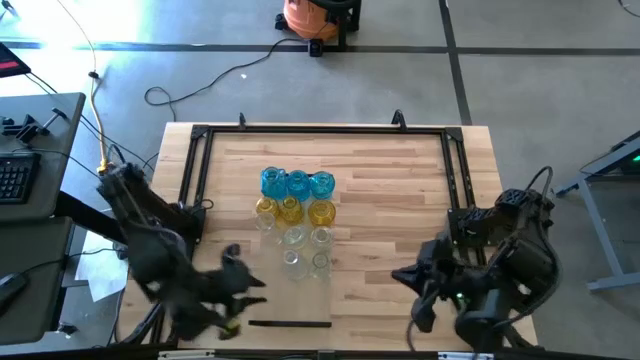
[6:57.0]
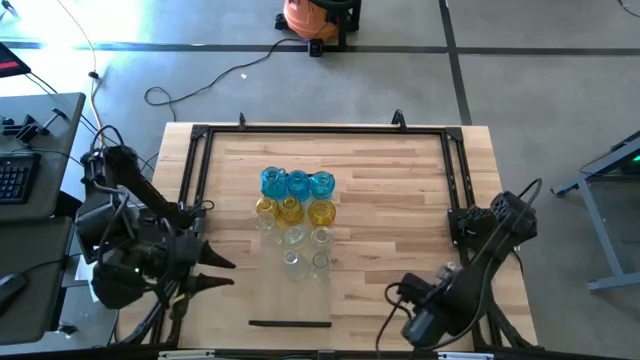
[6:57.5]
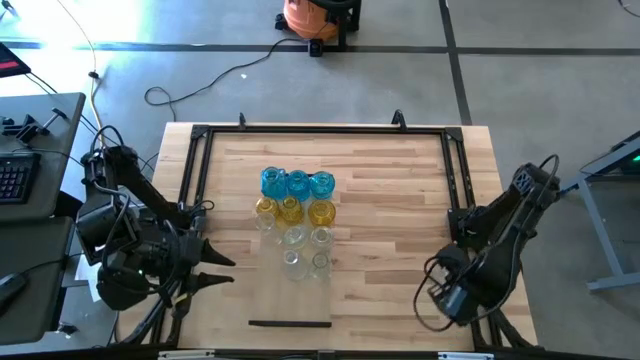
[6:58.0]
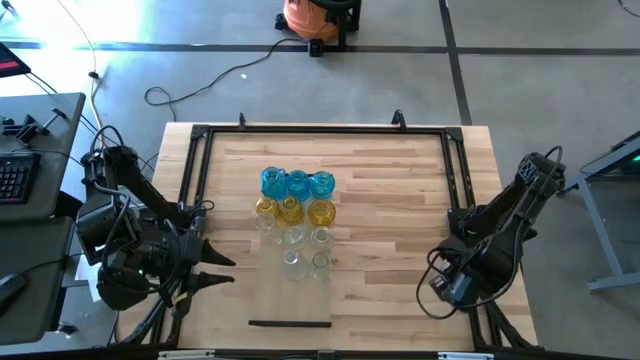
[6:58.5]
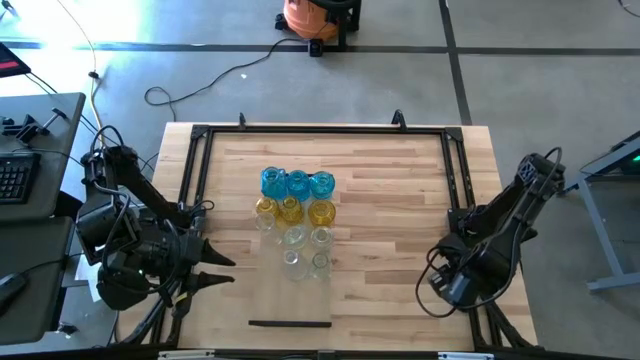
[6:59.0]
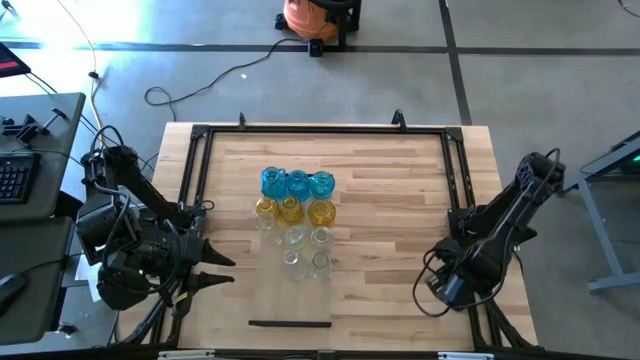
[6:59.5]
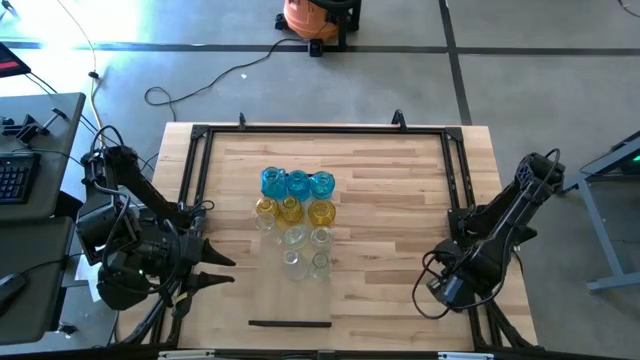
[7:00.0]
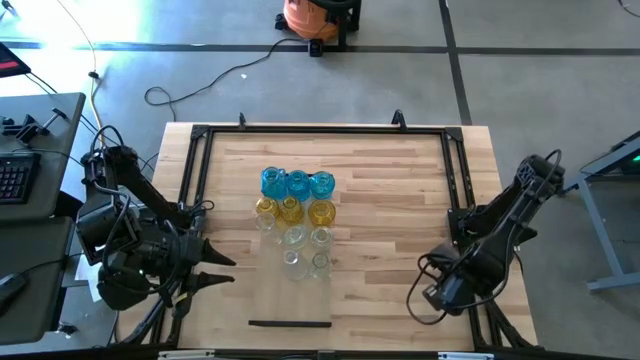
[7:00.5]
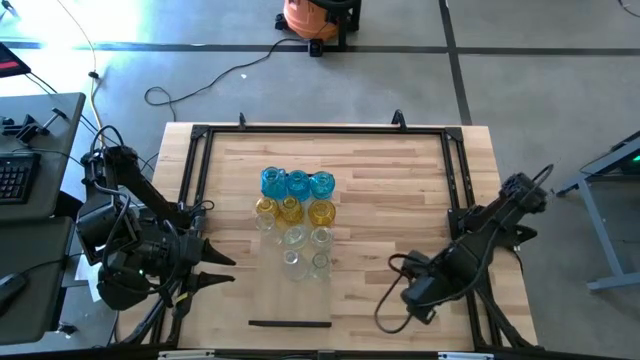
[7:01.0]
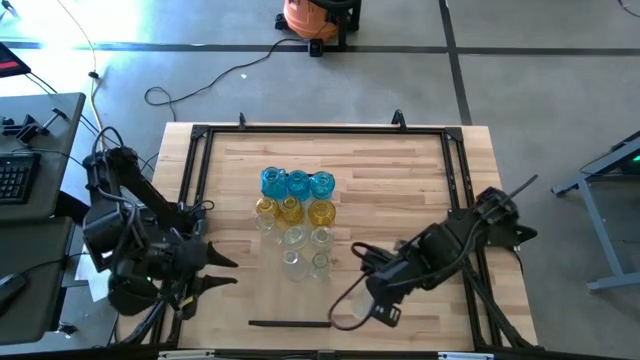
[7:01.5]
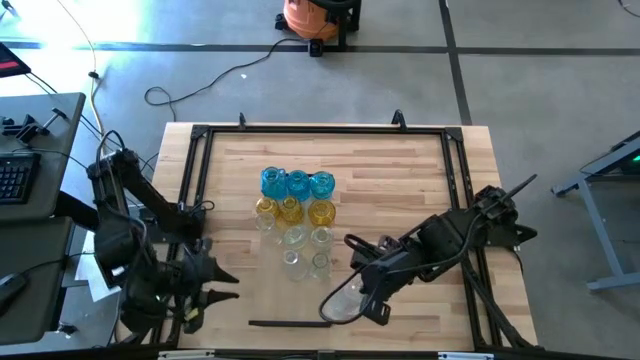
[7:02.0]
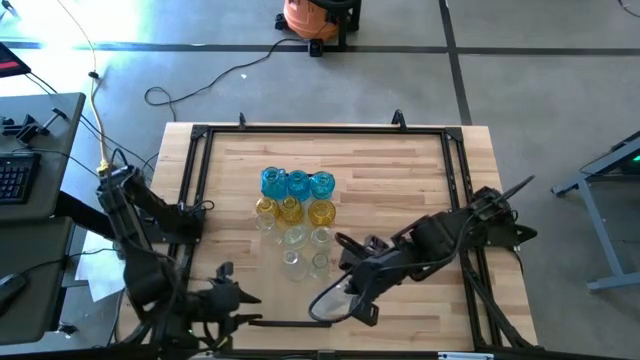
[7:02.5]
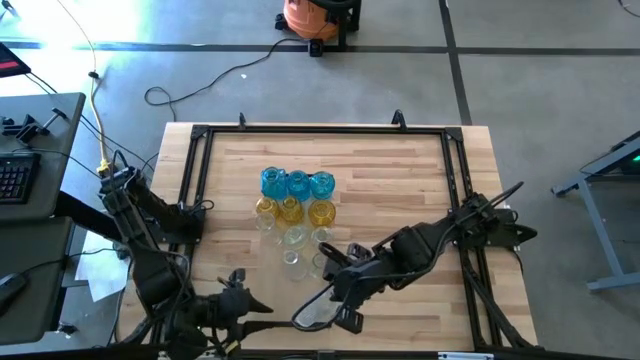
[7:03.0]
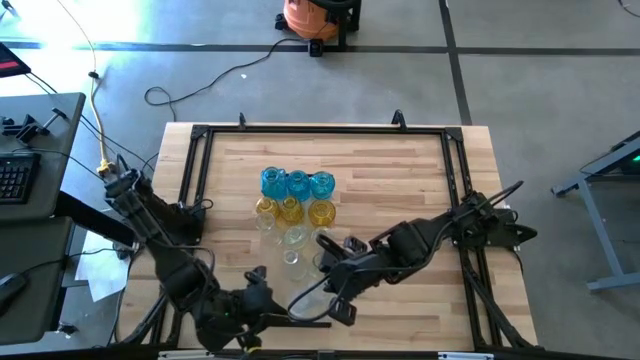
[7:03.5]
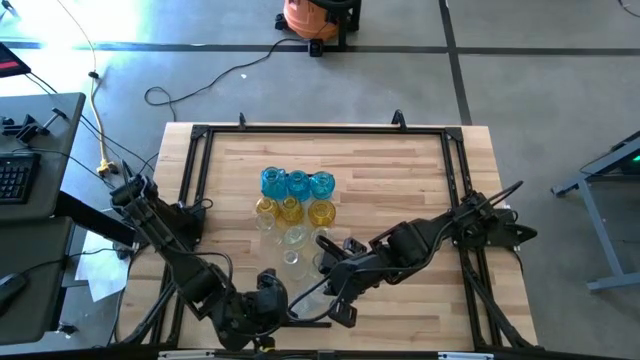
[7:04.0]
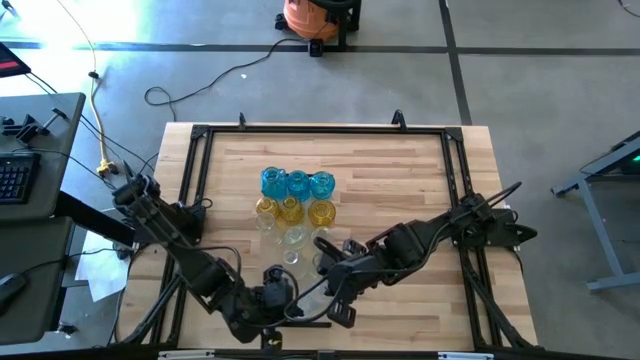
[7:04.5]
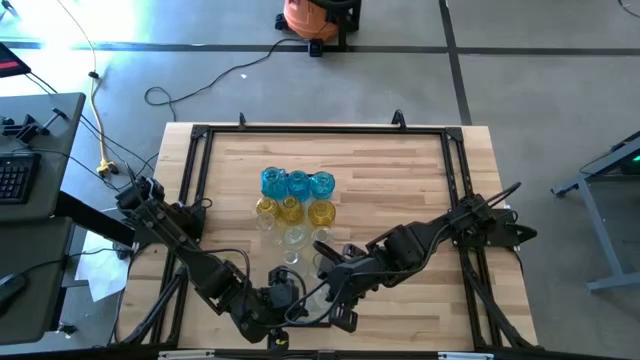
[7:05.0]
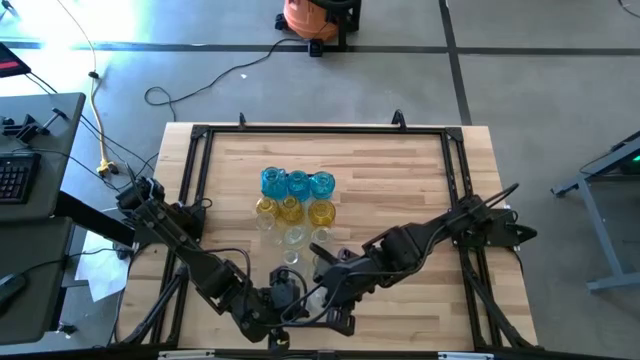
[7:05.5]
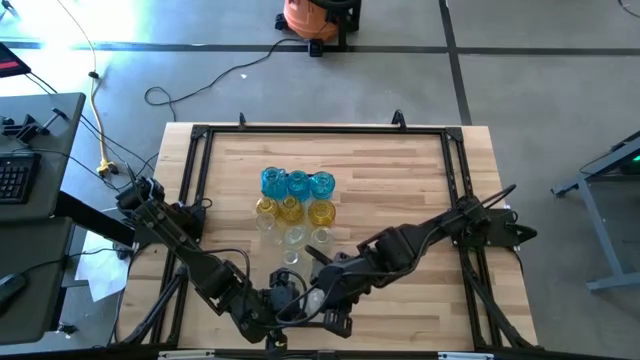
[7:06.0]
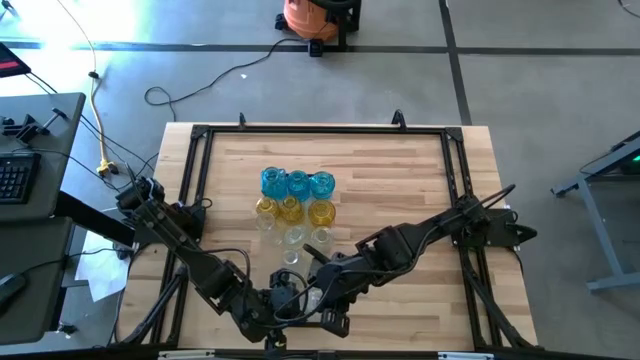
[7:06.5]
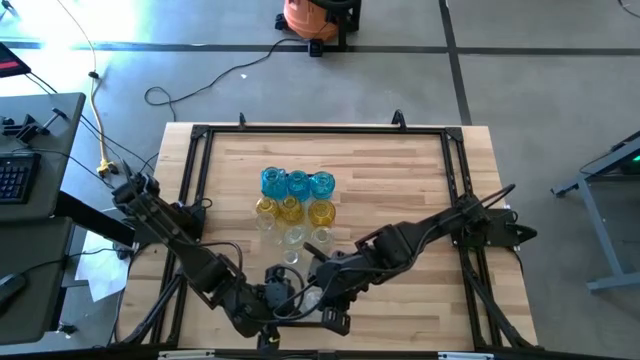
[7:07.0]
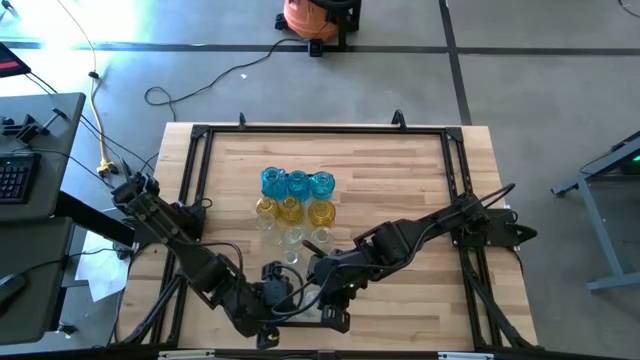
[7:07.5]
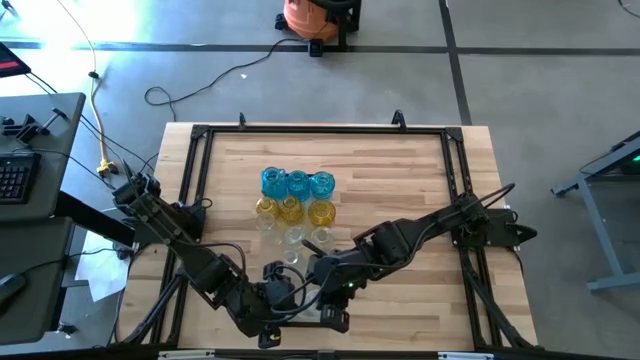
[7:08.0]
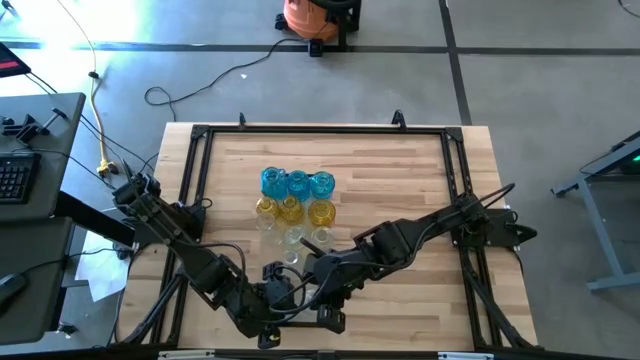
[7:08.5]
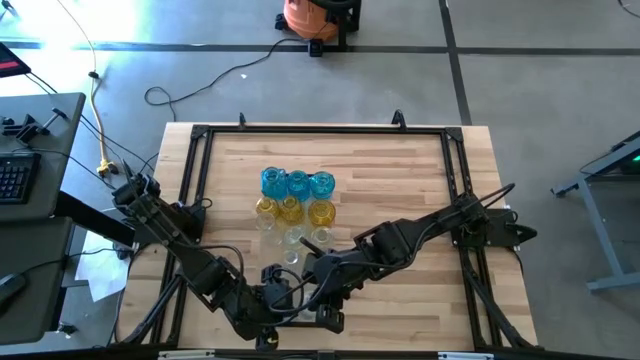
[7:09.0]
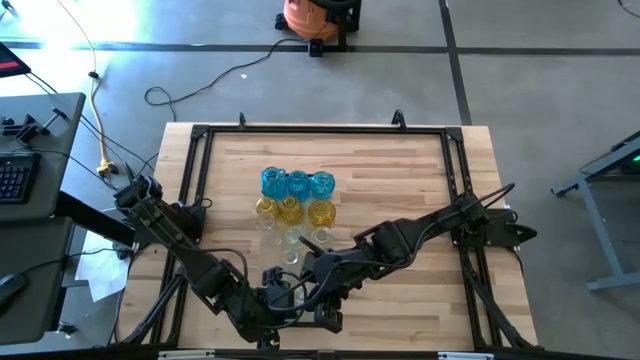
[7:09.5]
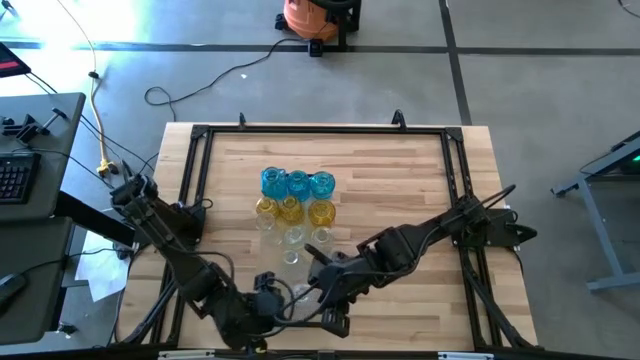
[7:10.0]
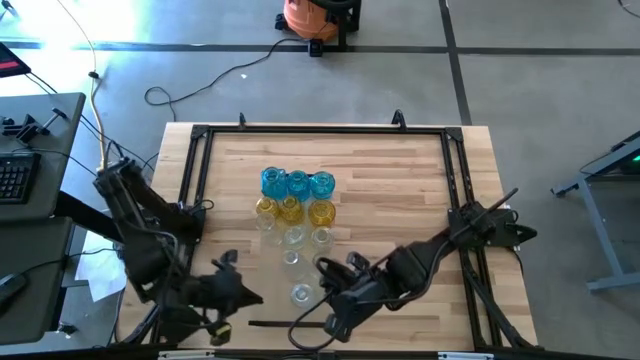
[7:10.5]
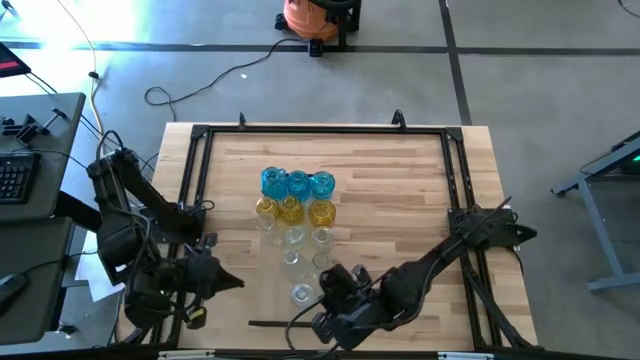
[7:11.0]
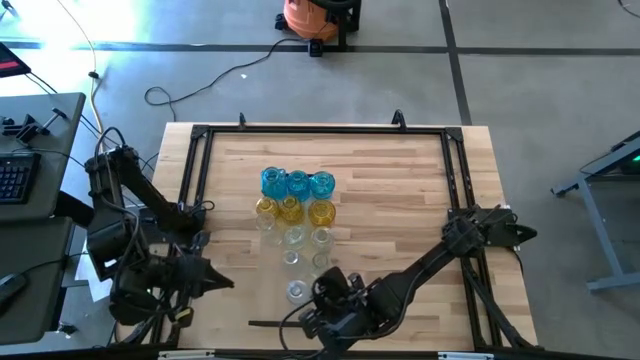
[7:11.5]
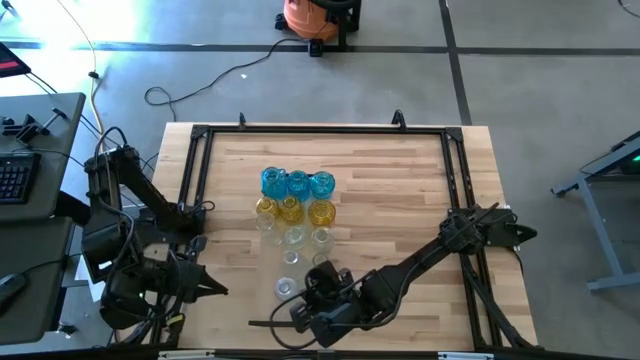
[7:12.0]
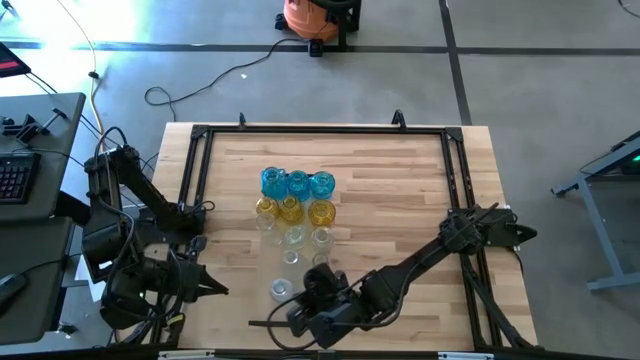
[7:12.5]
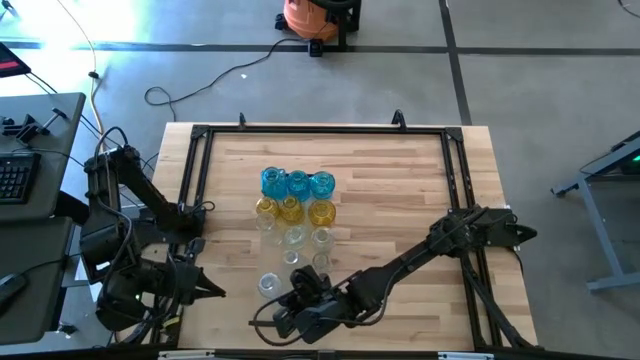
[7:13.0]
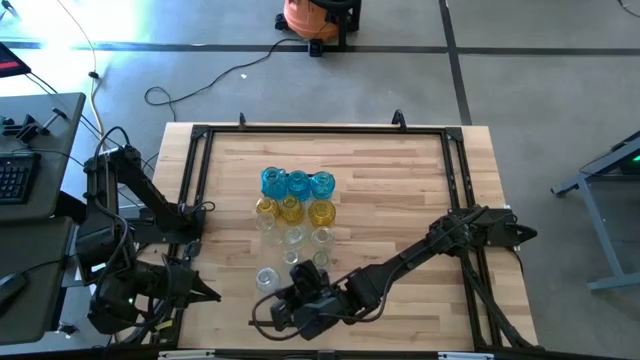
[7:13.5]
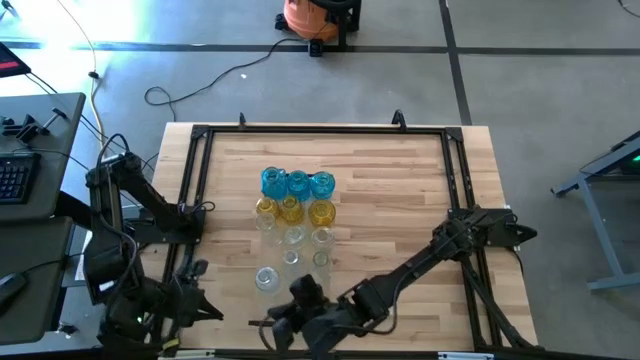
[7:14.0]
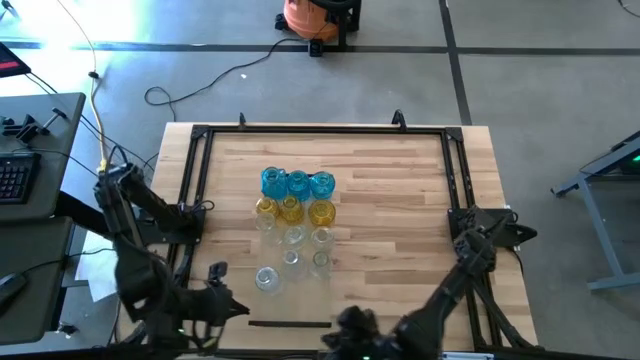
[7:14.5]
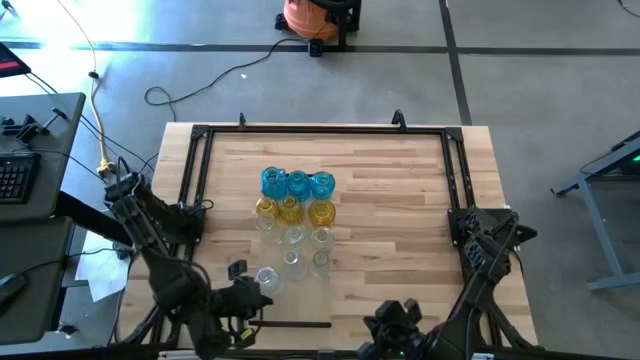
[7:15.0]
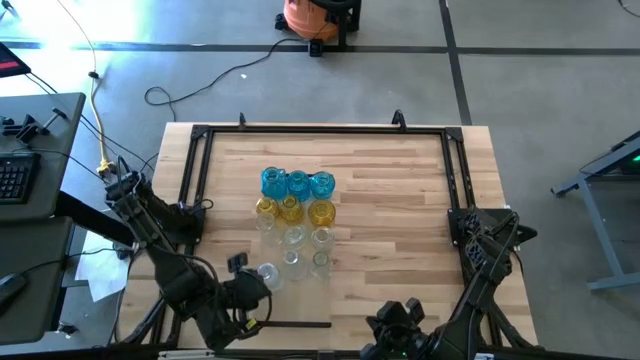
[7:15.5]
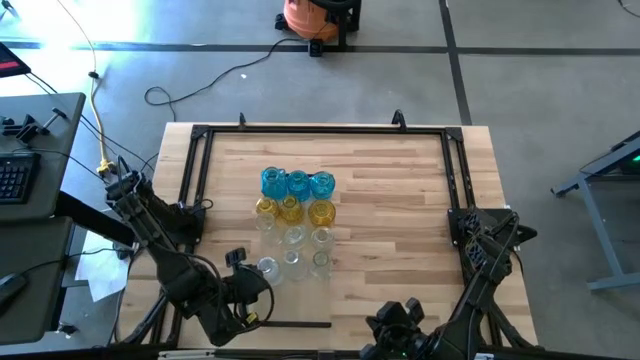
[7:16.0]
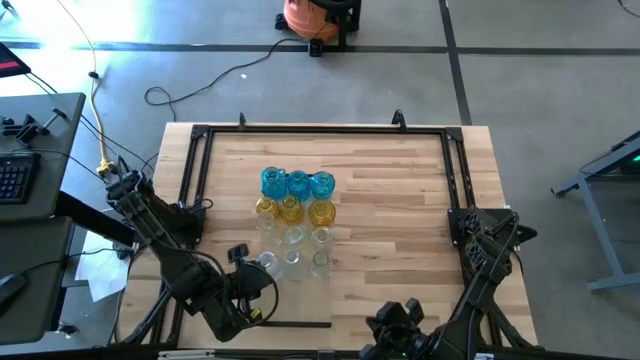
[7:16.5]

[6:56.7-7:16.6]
Task: sort vases onto shelf
Put the transparent vase on the shelf to align with the other transparent vases

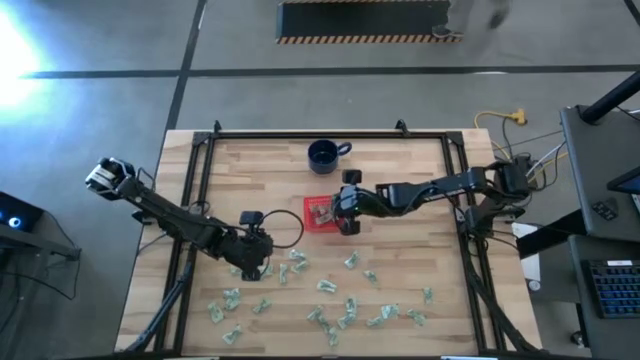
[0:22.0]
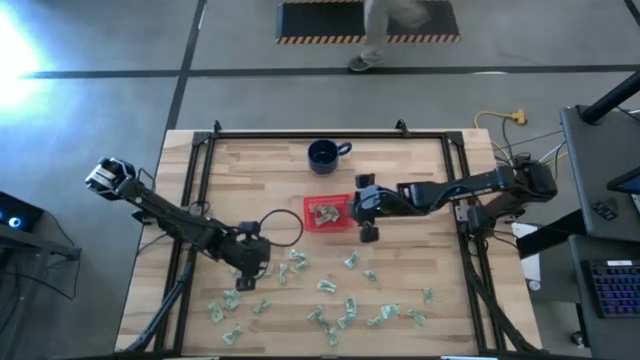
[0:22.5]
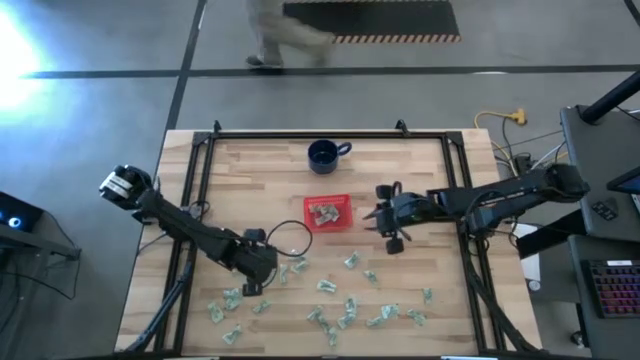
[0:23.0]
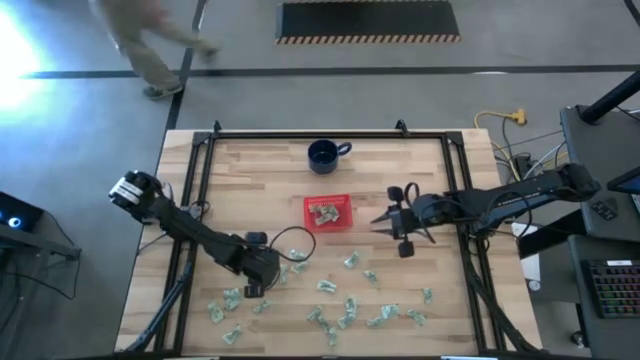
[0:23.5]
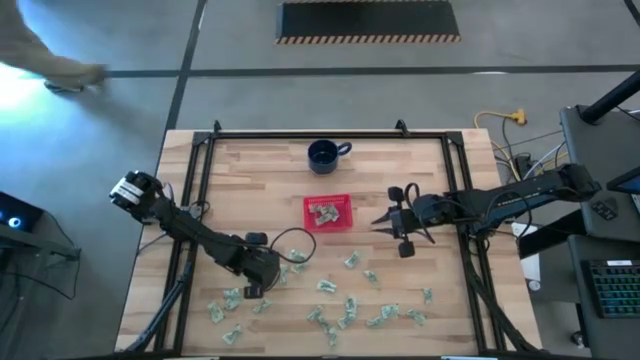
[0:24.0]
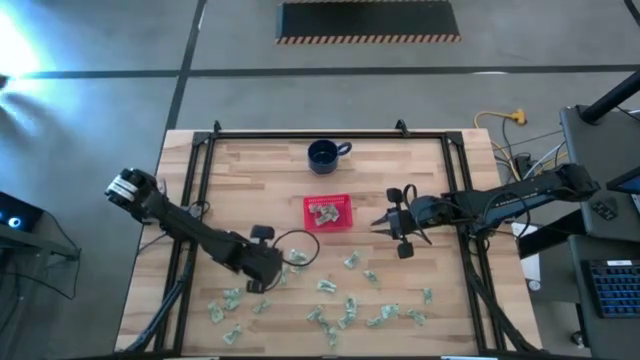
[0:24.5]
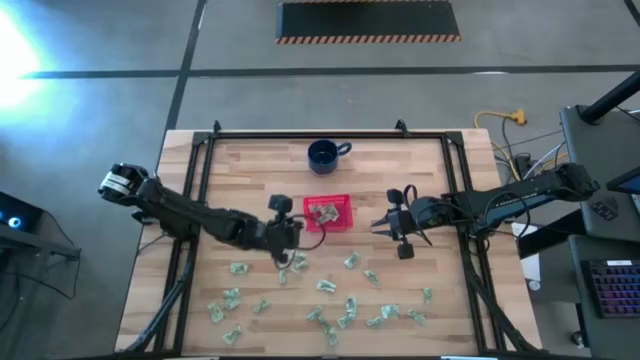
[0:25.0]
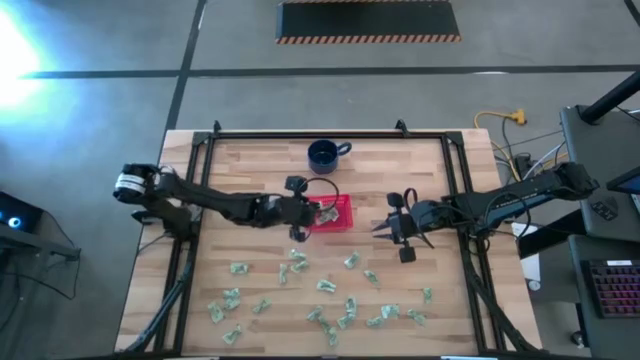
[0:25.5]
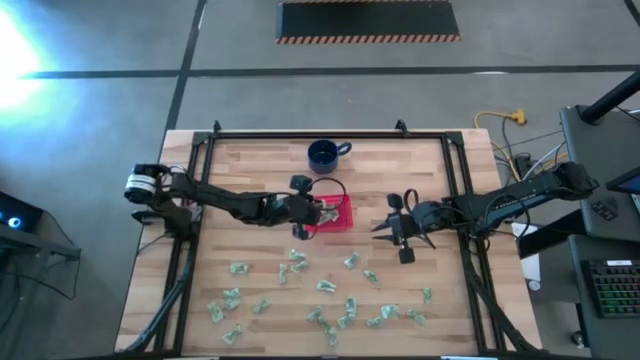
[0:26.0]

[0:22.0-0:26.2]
Task: Pick and place items into bin
Put the stevia packet into the red bin
